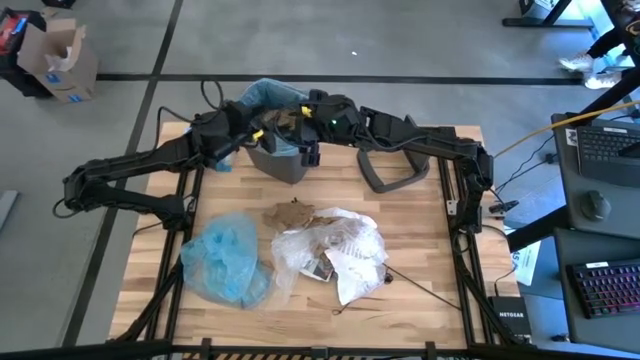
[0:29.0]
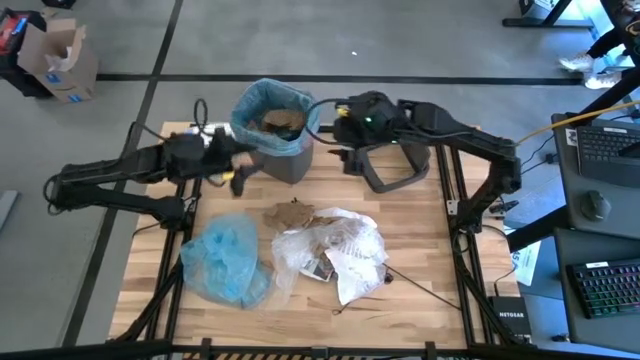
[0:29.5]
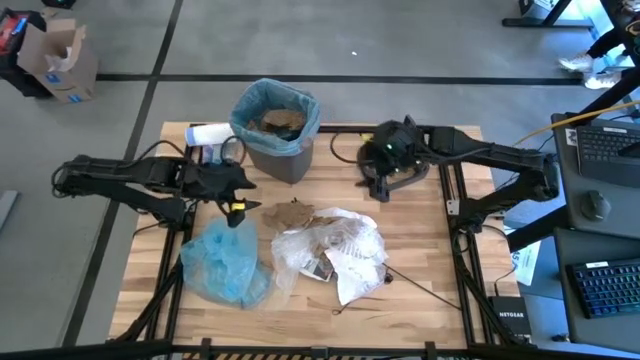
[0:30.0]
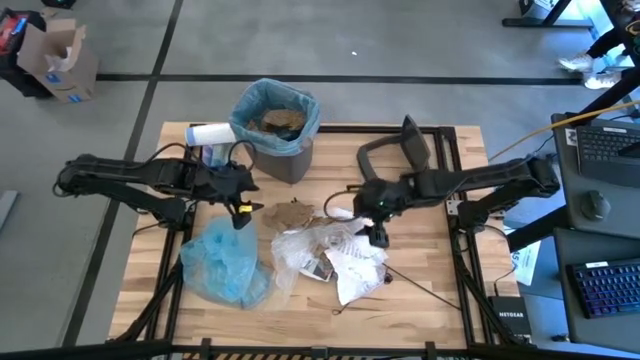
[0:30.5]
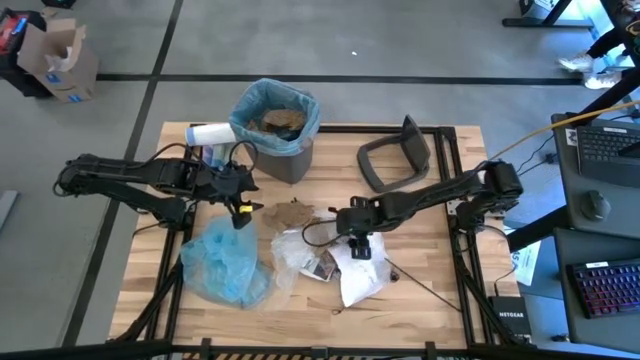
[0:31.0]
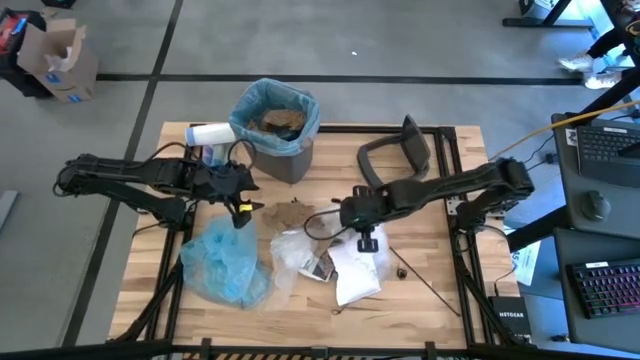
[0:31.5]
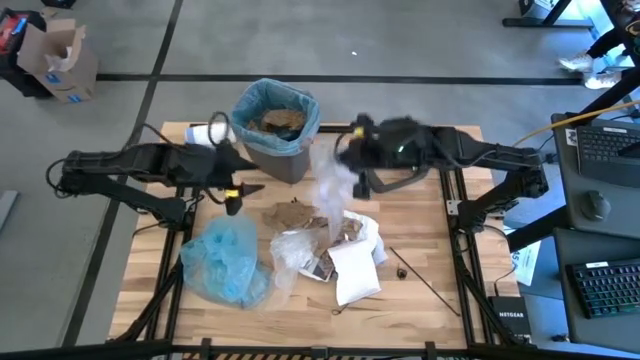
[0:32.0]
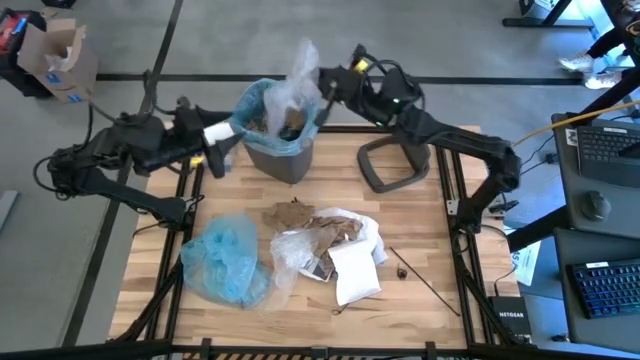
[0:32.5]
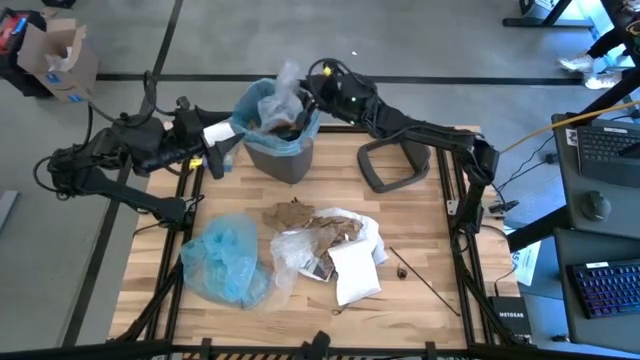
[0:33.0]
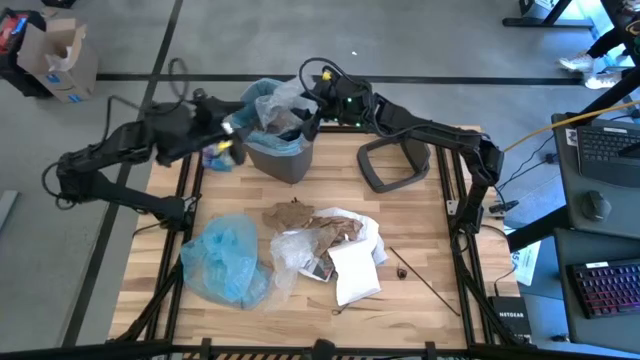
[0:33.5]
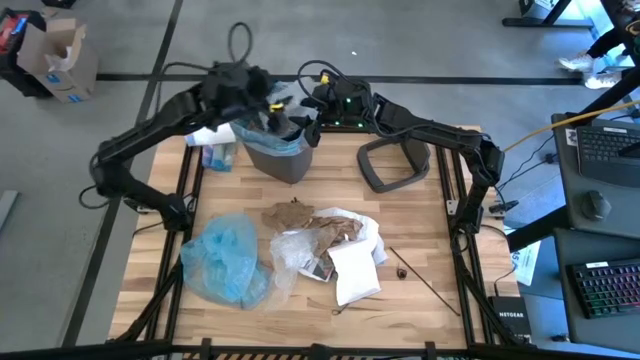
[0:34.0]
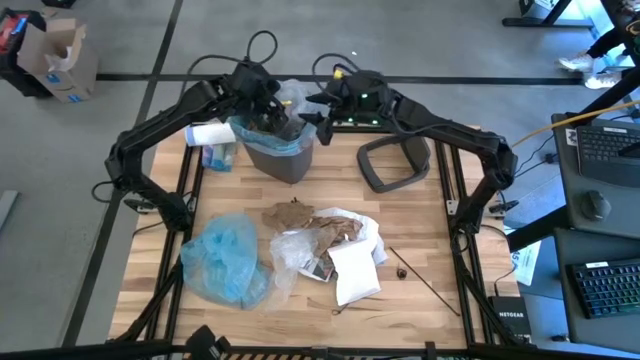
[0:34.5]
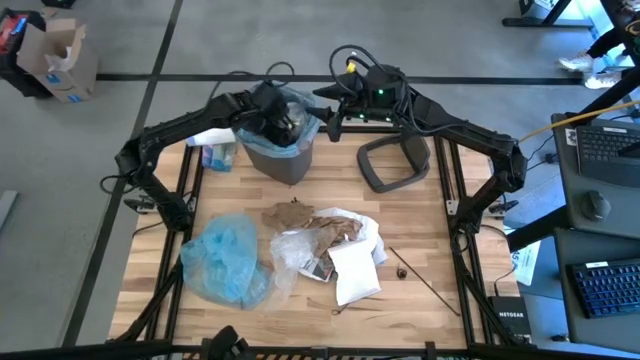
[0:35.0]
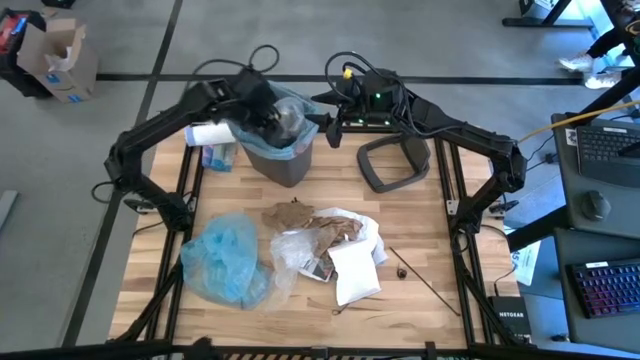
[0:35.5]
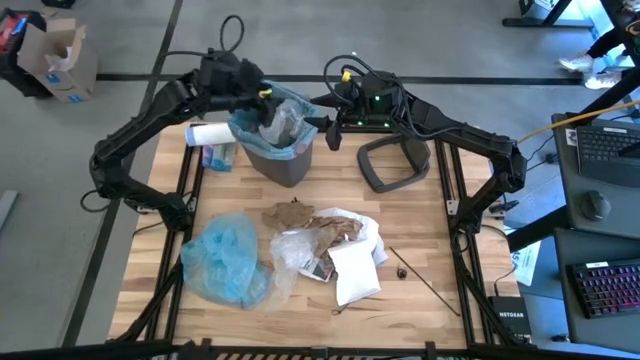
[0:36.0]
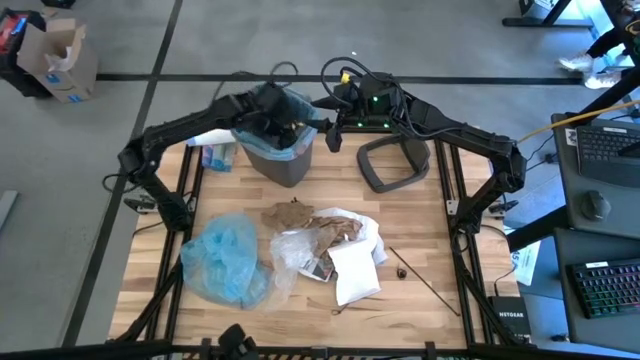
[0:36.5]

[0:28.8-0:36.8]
Task: Pick and place trash into bin
Put the cellophane into the trash bin

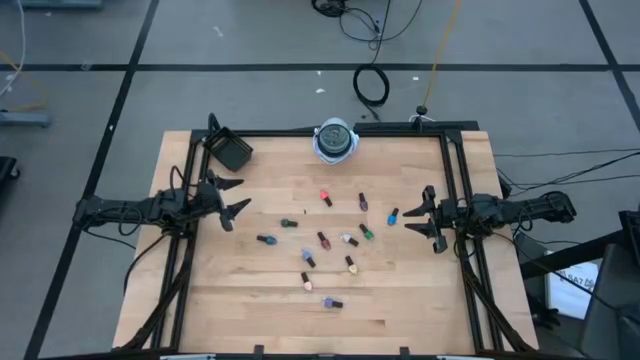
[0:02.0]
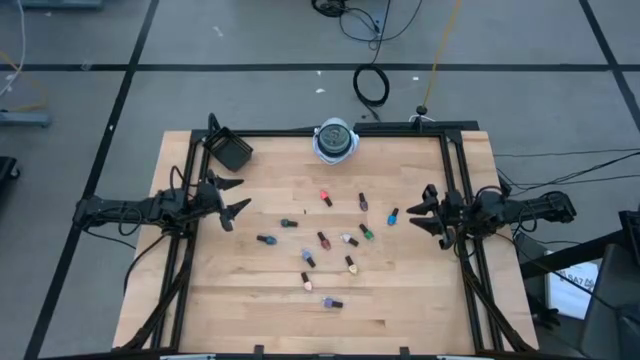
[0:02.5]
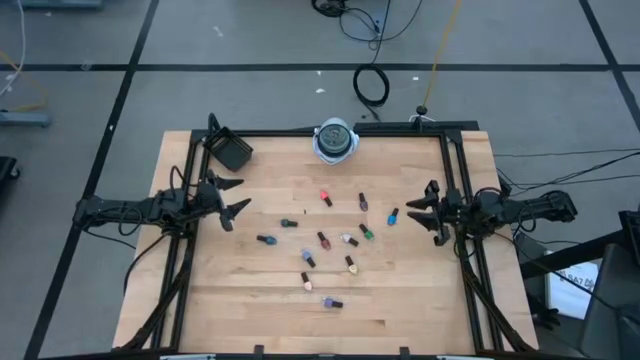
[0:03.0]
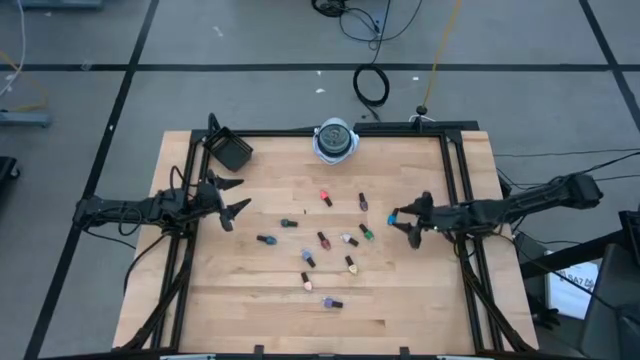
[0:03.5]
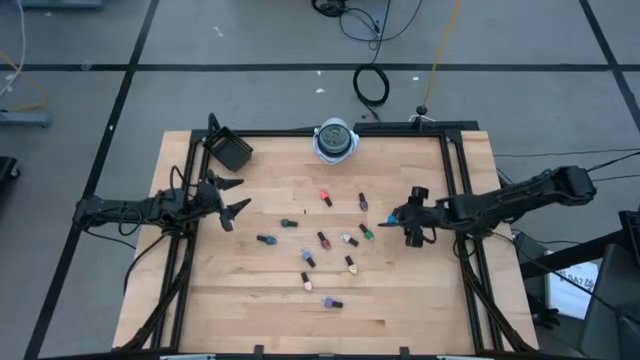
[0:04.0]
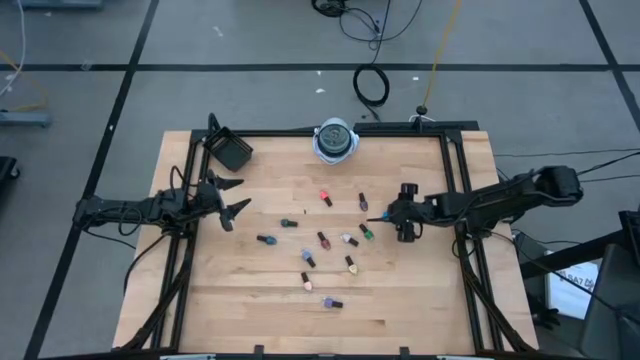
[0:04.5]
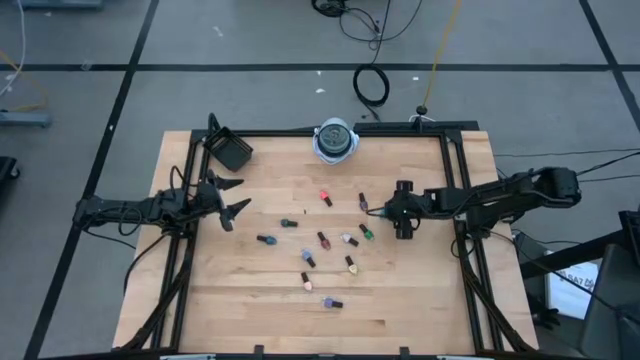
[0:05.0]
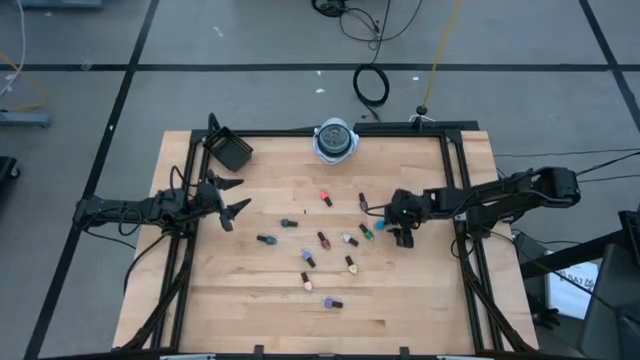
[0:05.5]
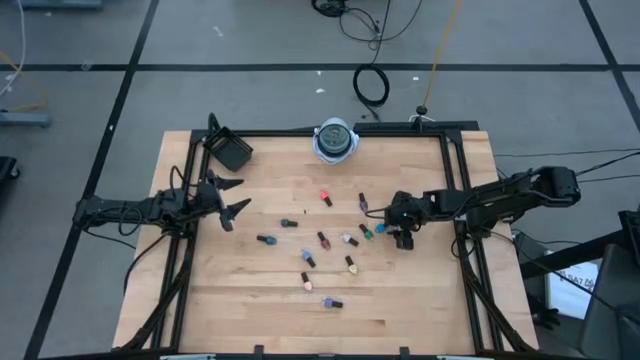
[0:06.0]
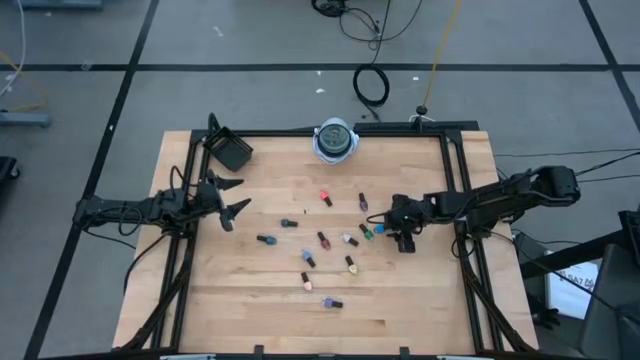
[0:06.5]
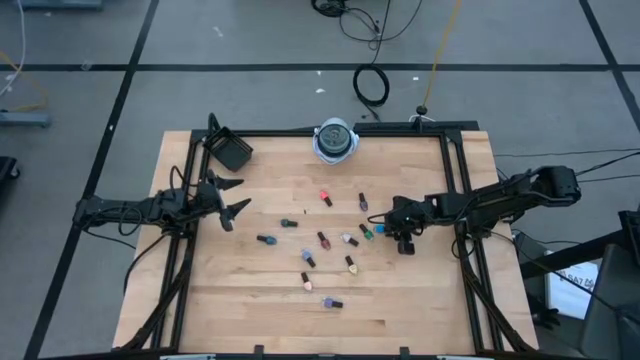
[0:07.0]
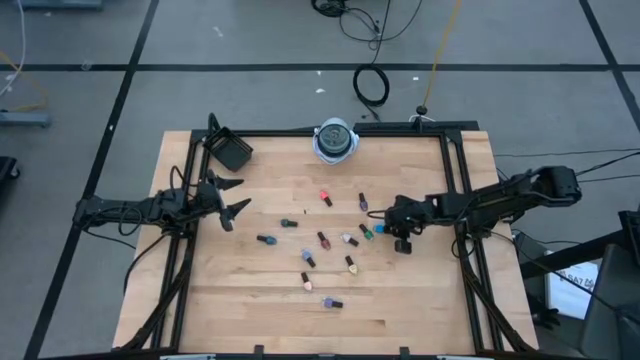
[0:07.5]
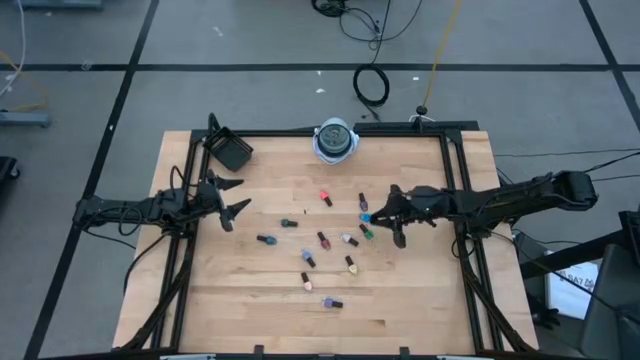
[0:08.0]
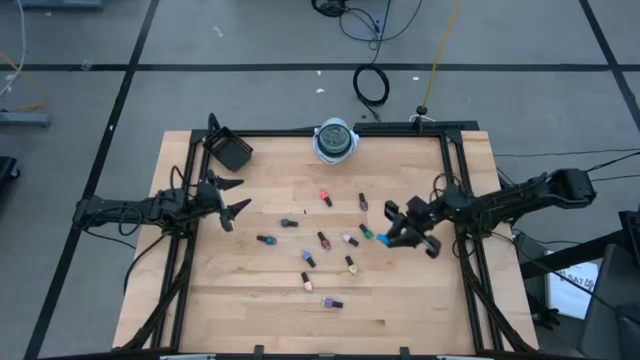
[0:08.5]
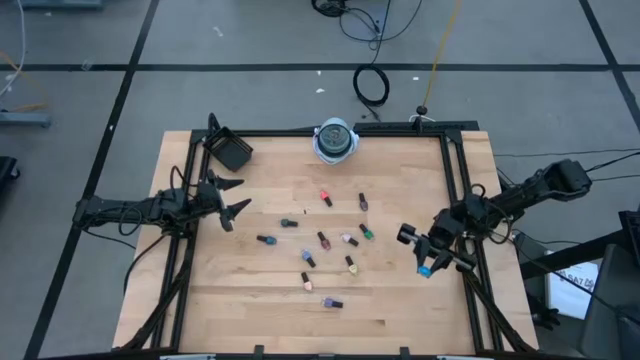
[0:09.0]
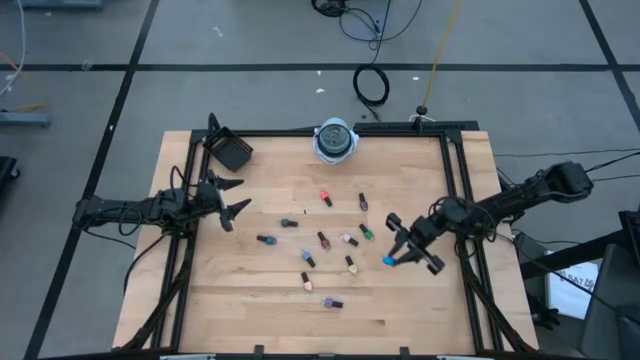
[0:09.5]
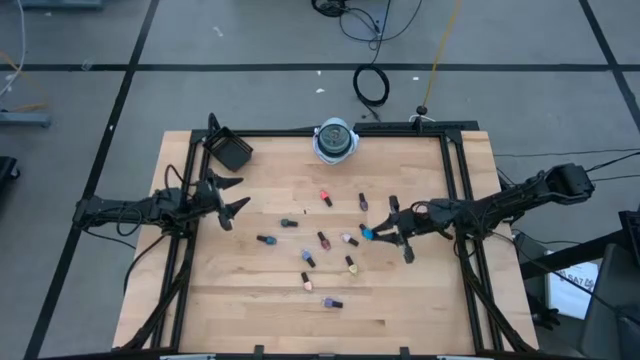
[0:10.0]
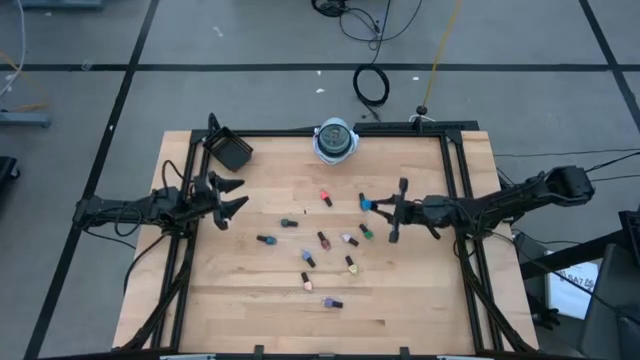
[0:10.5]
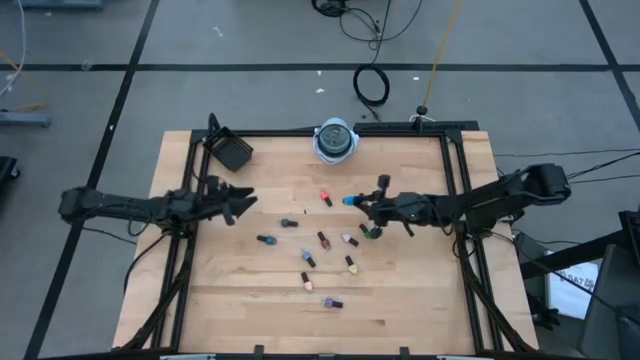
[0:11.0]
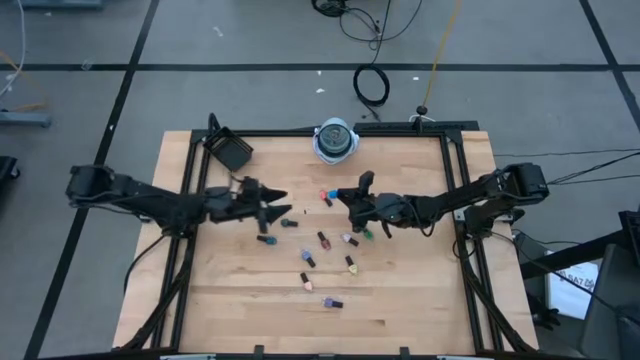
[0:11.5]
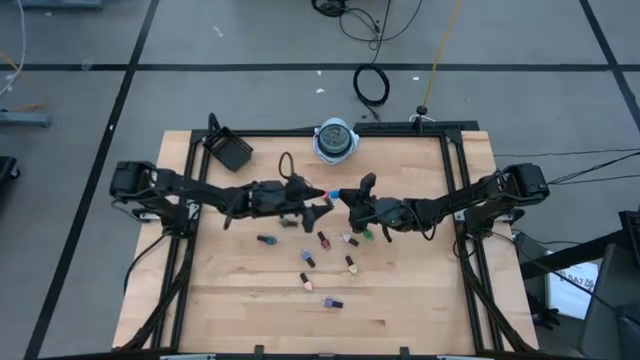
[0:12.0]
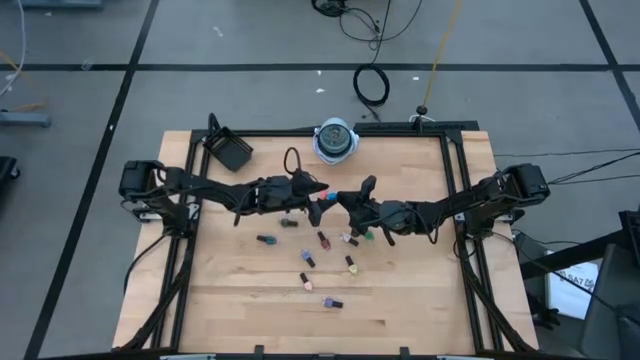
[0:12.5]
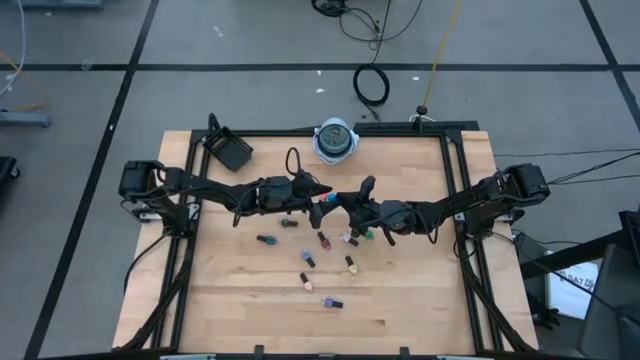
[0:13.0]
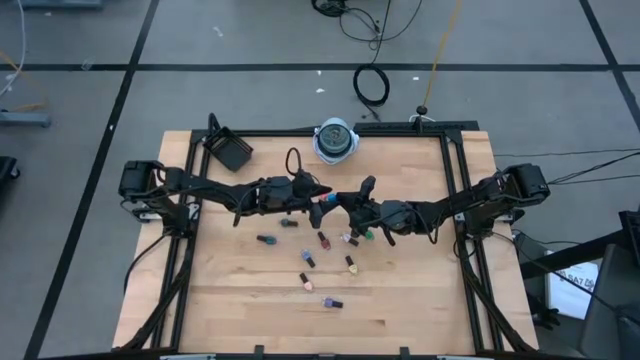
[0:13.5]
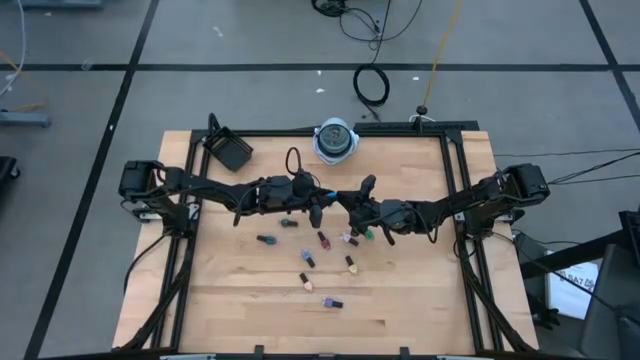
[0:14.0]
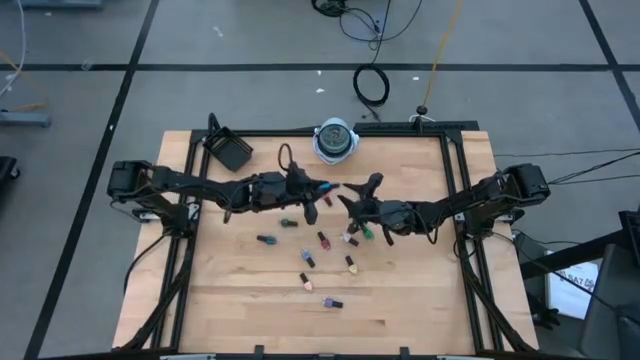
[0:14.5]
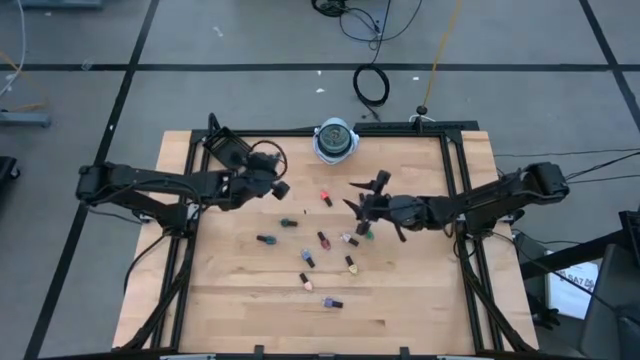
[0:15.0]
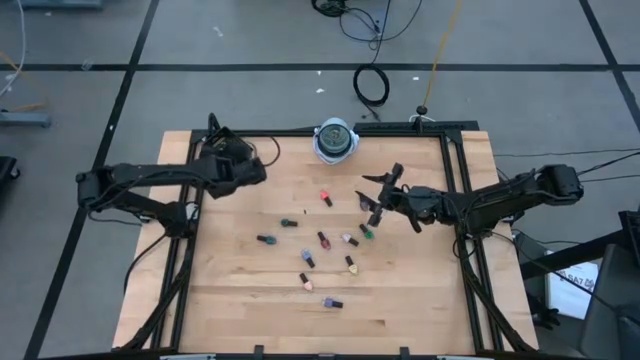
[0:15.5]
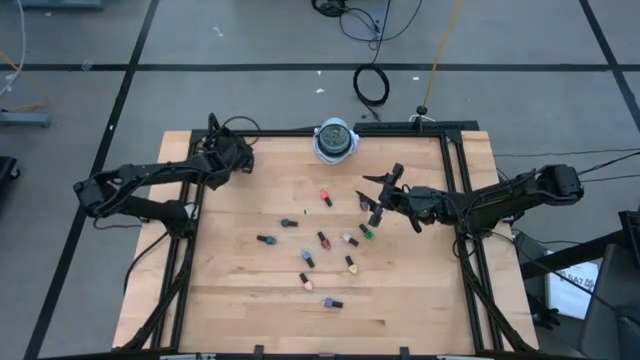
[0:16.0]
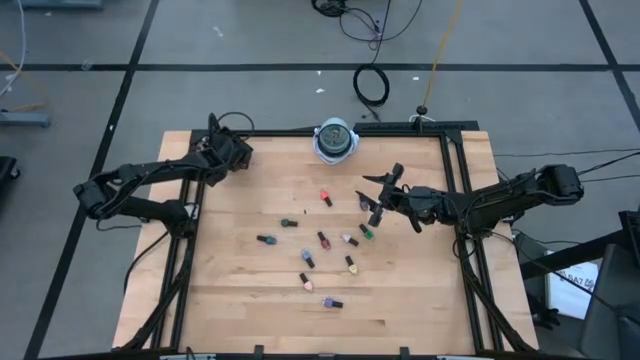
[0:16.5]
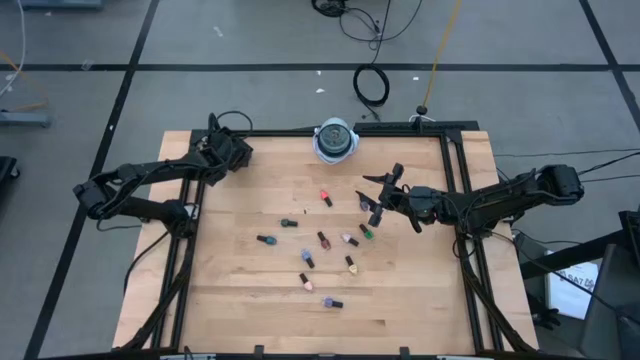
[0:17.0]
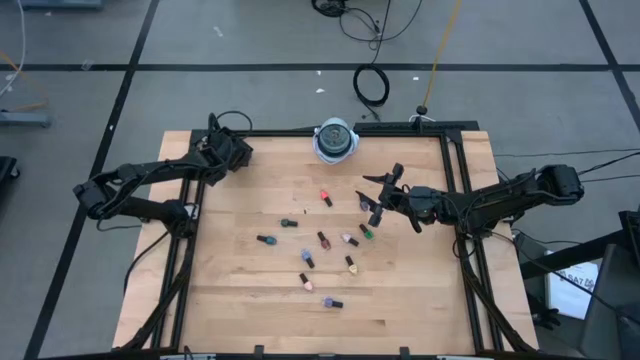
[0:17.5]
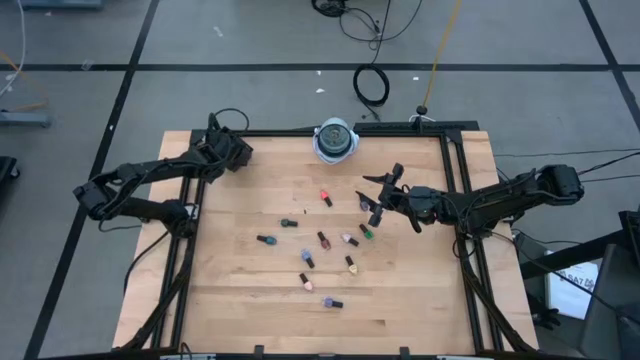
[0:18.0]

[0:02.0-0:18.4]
Task: Pick & Place Nail Polish
Put the light blue nail polish bottle into the black bin
